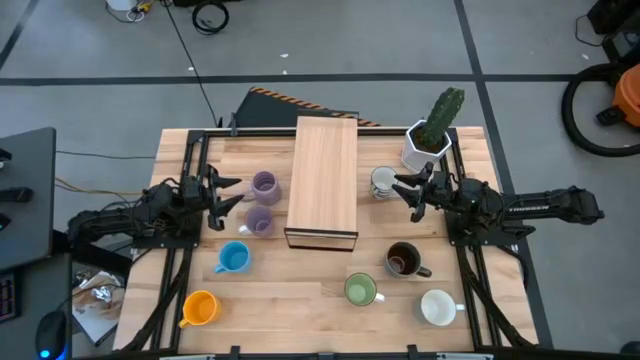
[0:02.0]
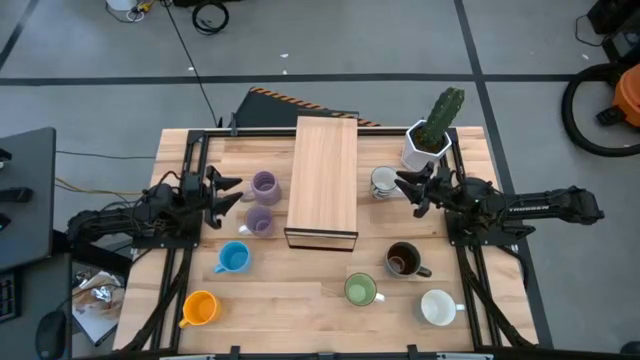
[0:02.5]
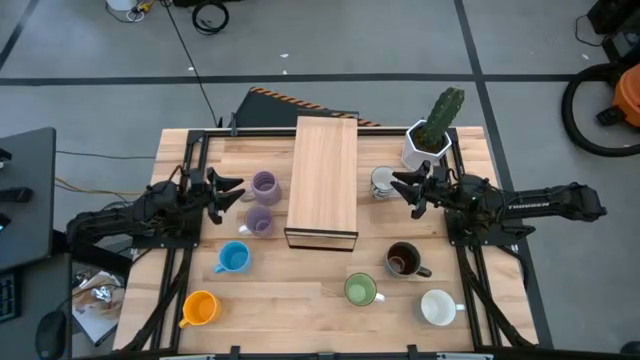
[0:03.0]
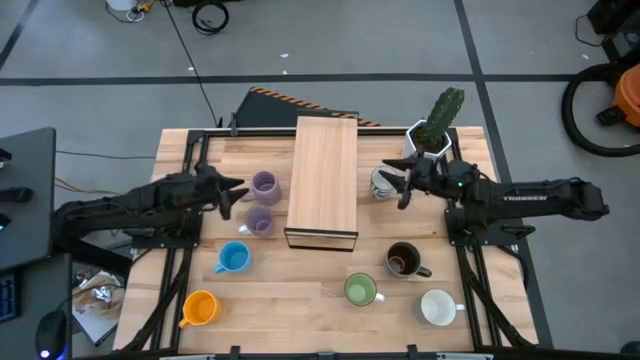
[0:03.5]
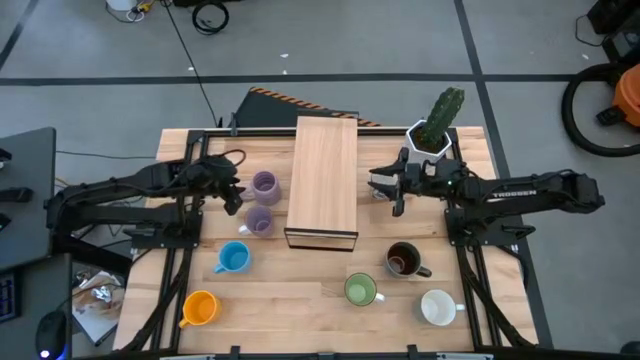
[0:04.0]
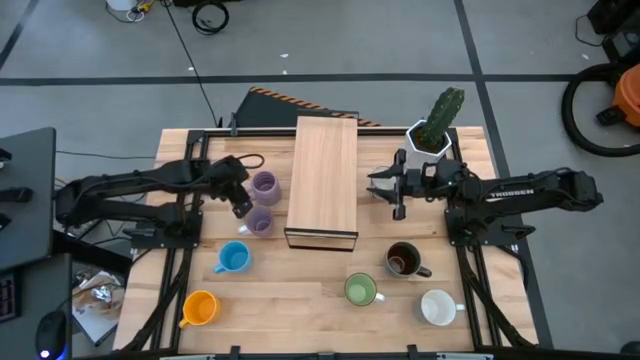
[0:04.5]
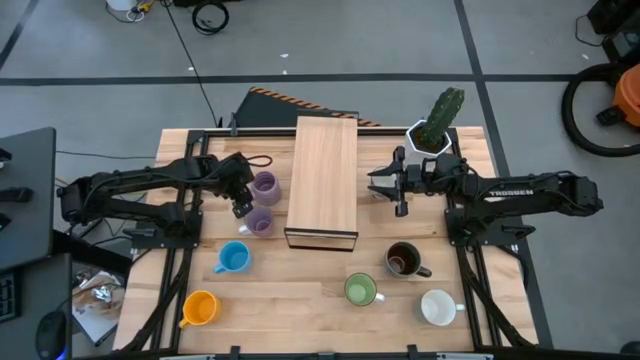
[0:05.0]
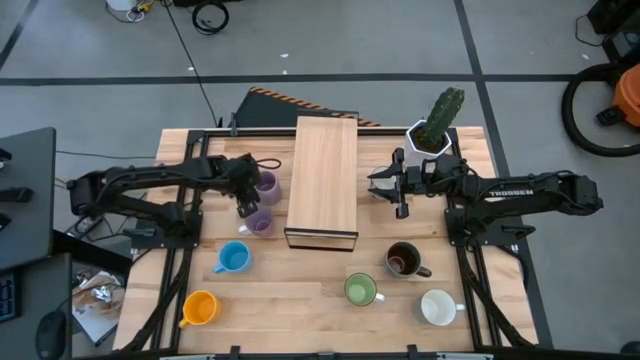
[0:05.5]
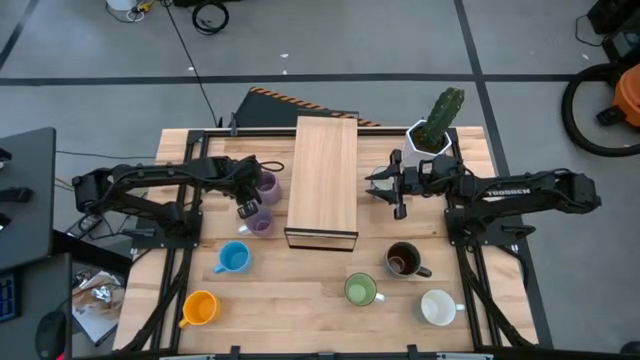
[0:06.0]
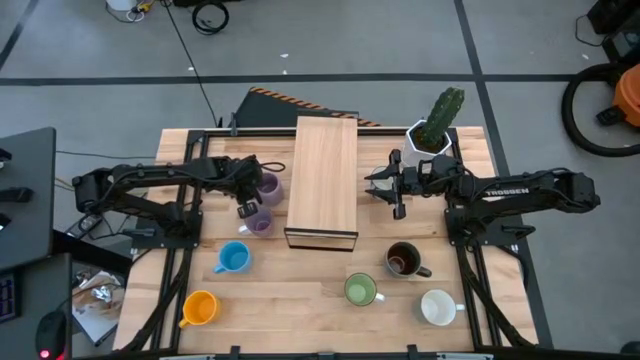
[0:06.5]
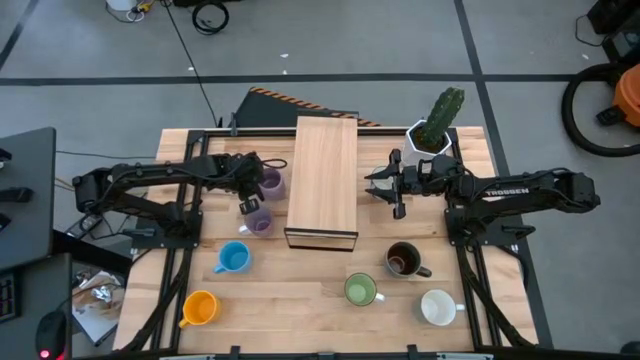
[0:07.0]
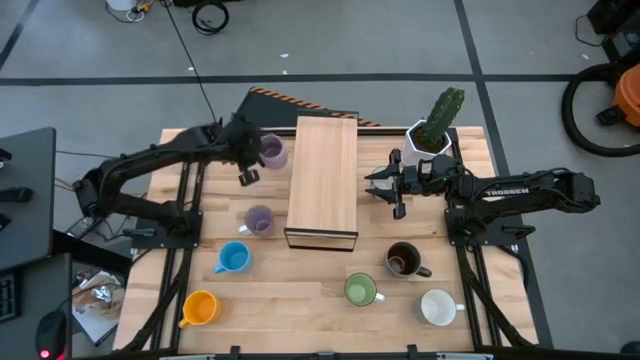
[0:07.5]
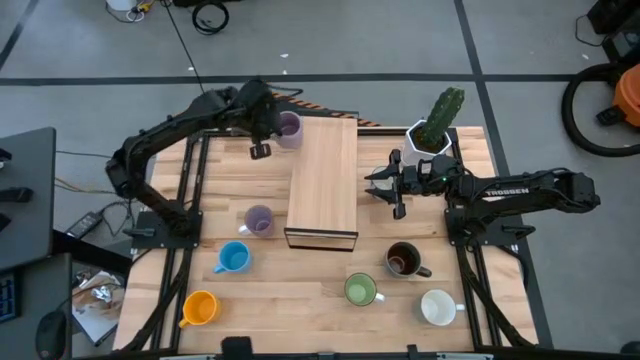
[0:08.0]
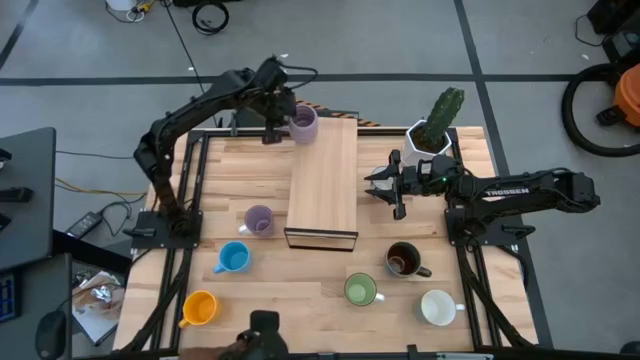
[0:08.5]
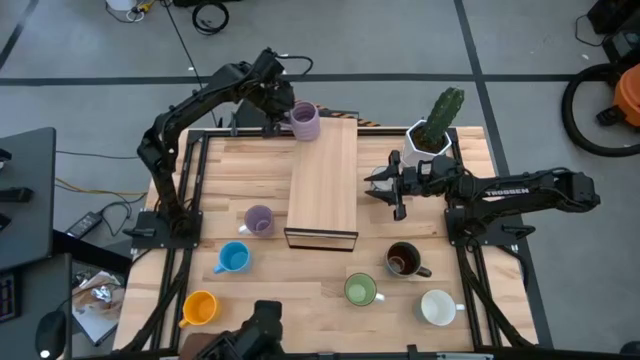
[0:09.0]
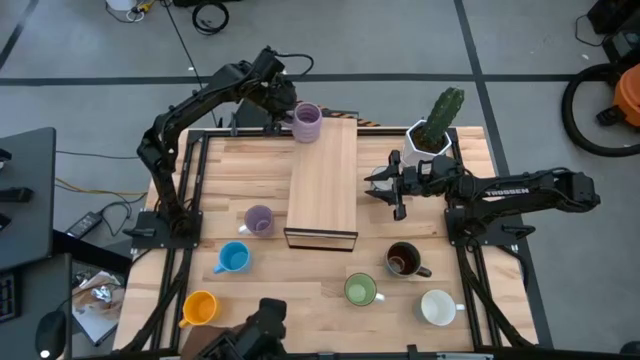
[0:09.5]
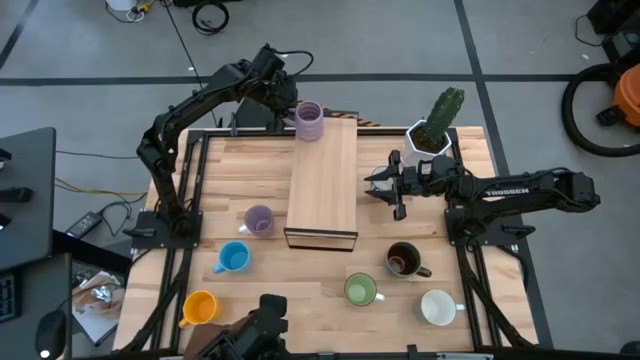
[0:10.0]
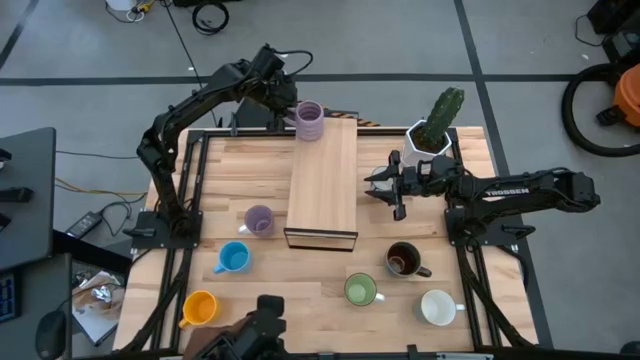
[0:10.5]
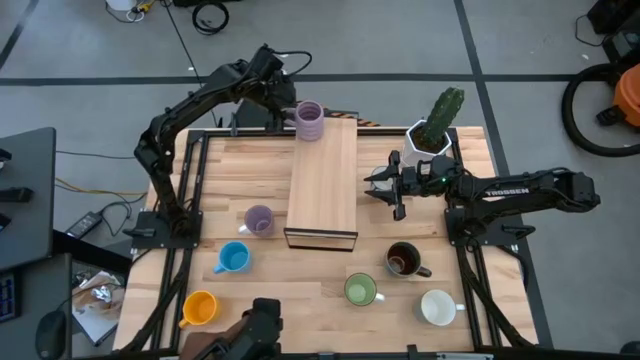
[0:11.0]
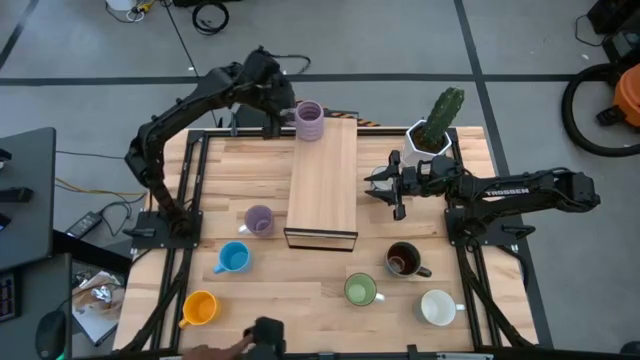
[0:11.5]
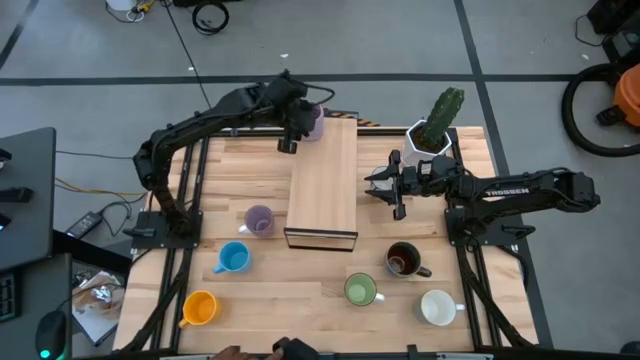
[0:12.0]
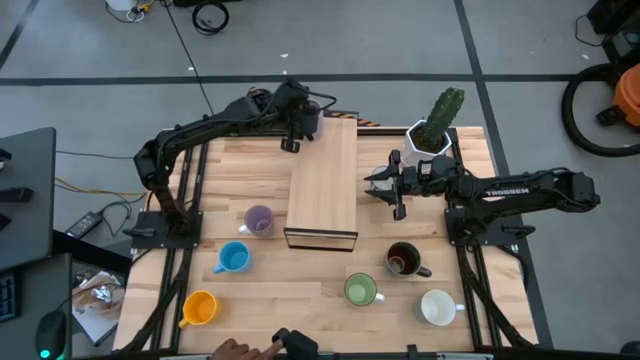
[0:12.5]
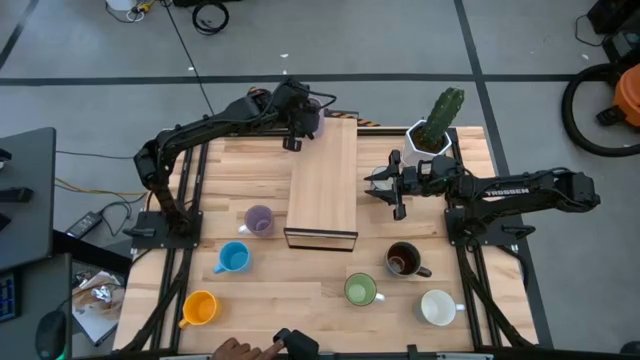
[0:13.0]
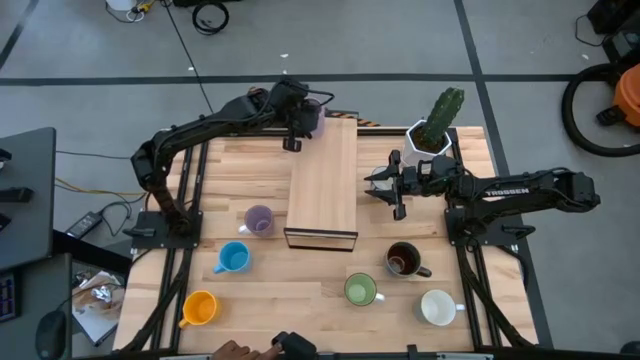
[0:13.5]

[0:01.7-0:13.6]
Task: Place coffee mugs
Put the top purple mug on the shelf

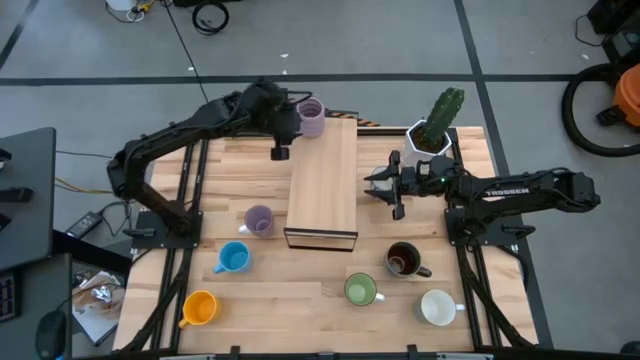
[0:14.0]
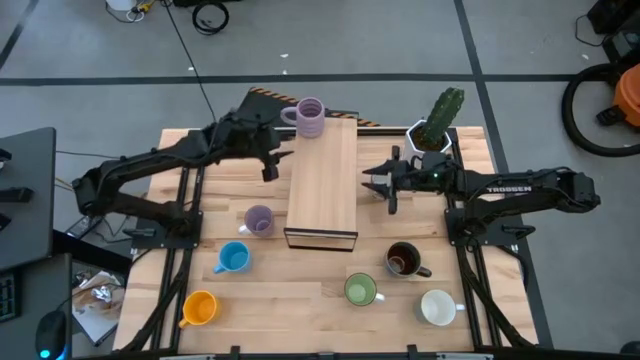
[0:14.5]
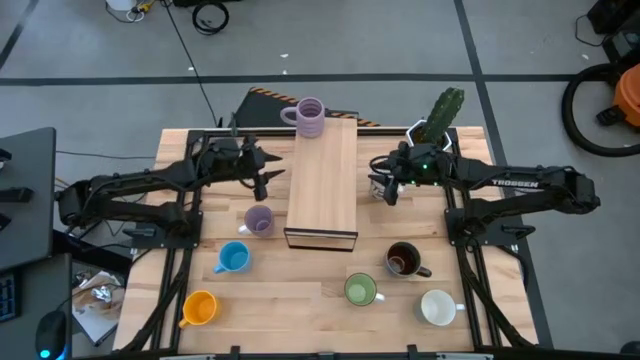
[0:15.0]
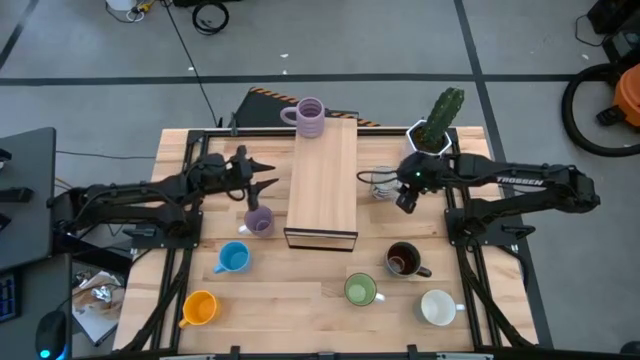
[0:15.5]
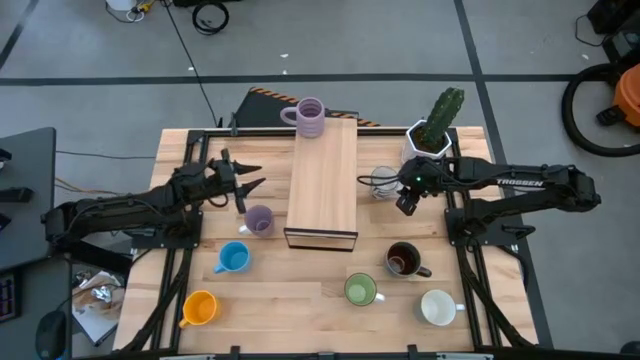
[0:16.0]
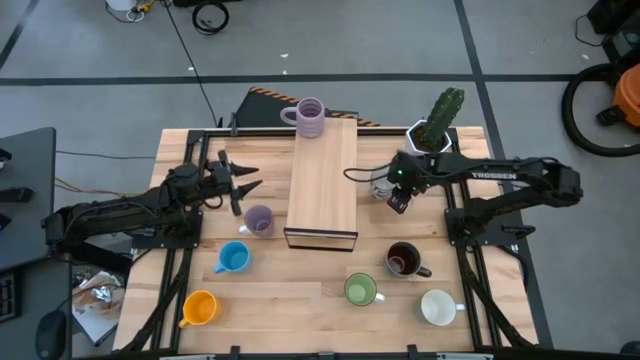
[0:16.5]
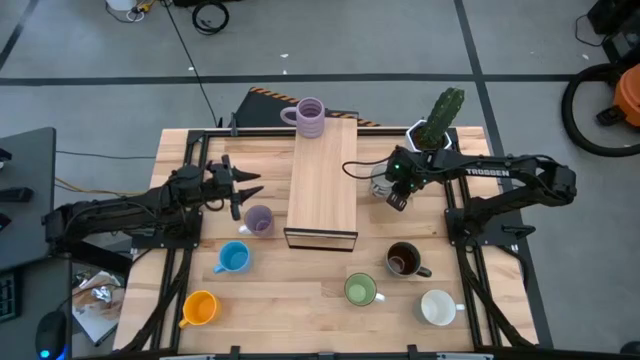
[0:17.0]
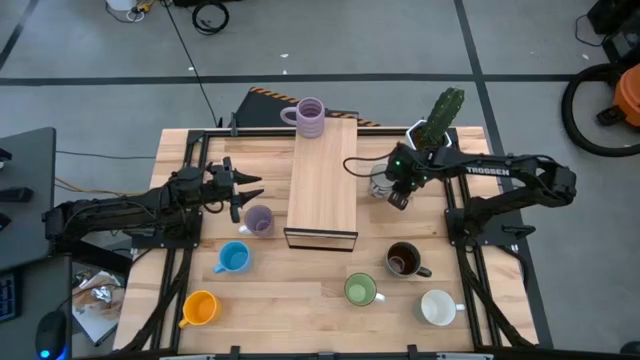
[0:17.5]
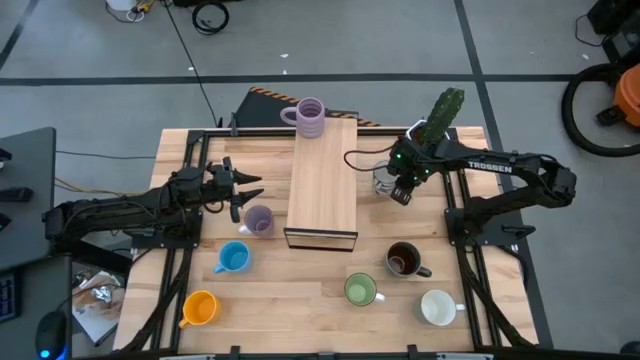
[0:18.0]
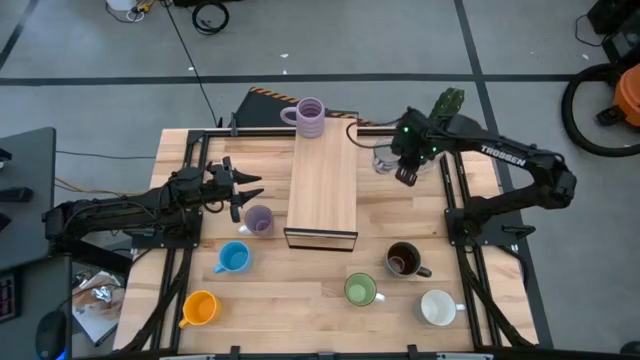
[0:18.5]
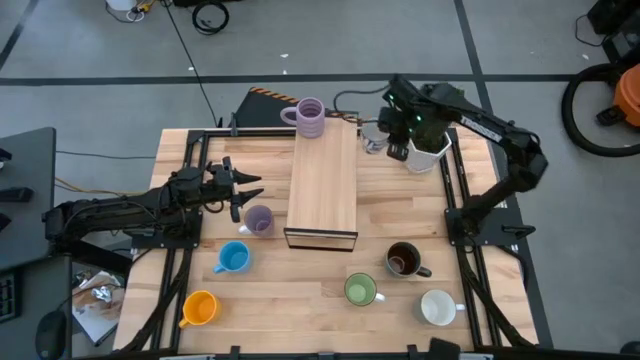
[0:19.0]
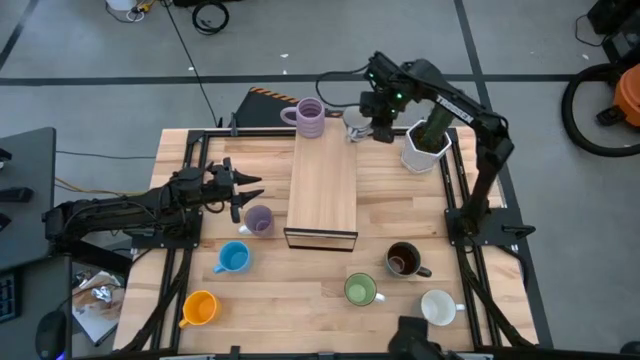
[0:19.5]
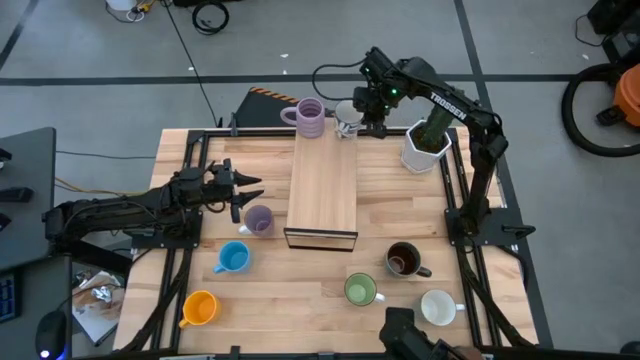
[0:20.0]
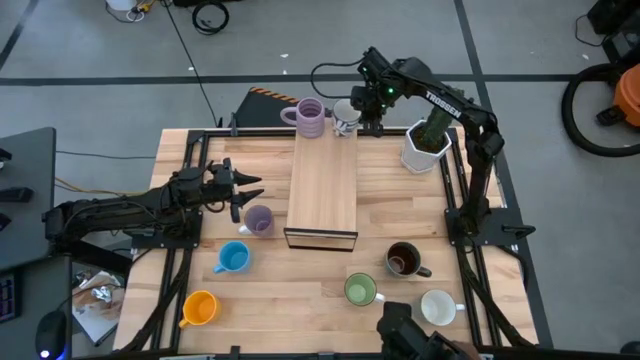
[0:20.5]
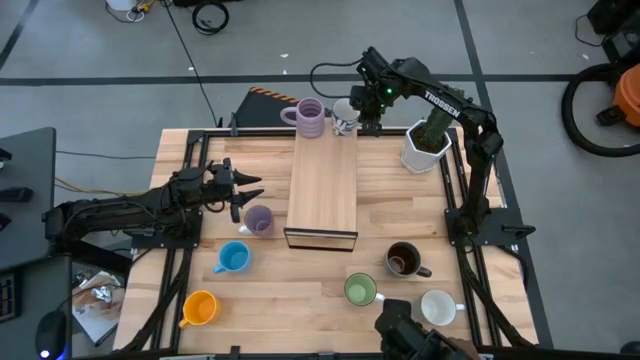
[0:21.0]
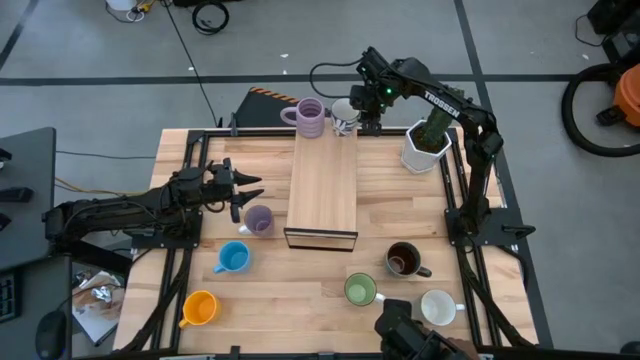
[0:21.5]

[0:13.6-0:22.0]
Put the dark blue patterned mug on the shelf

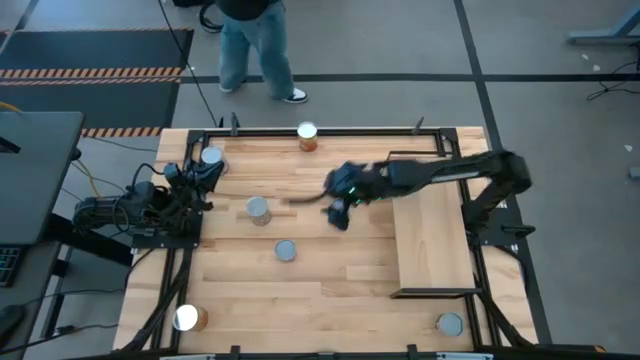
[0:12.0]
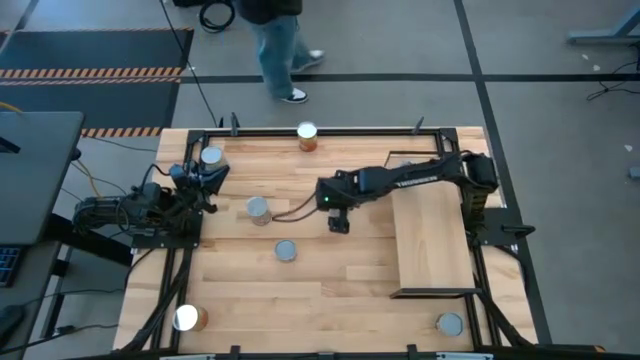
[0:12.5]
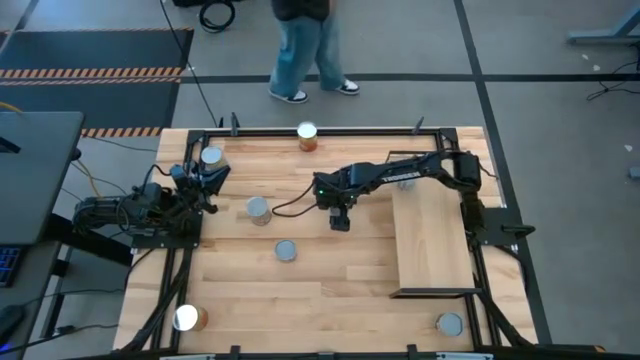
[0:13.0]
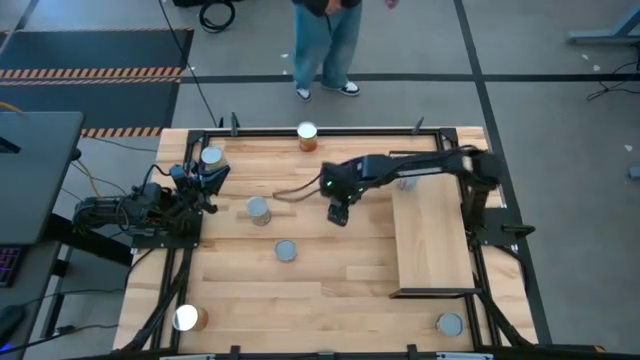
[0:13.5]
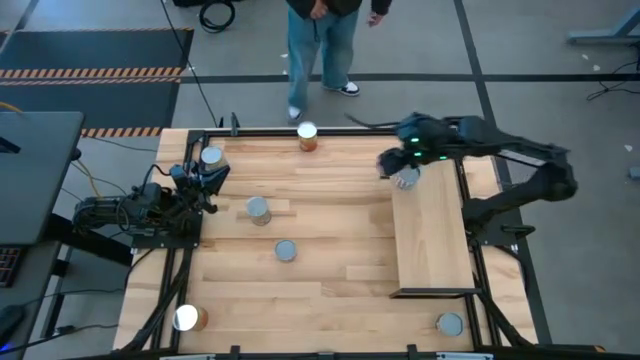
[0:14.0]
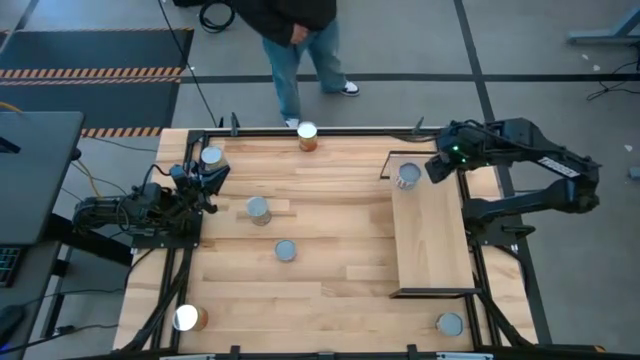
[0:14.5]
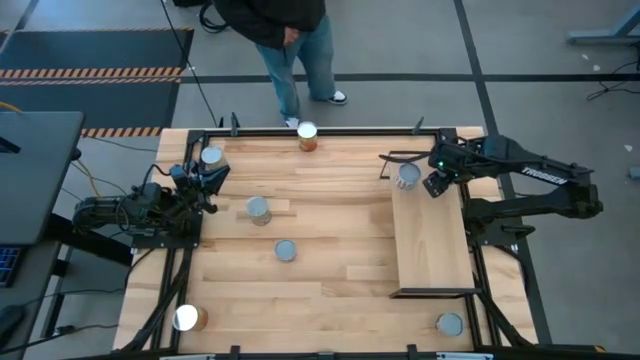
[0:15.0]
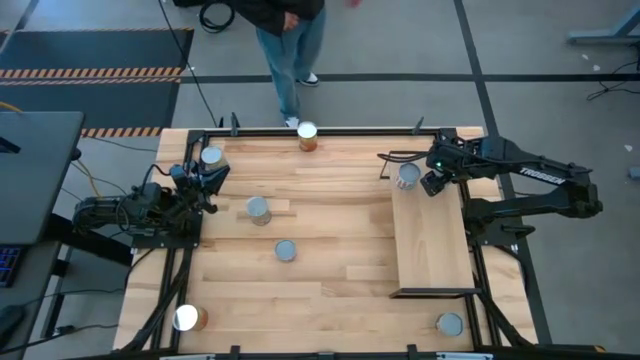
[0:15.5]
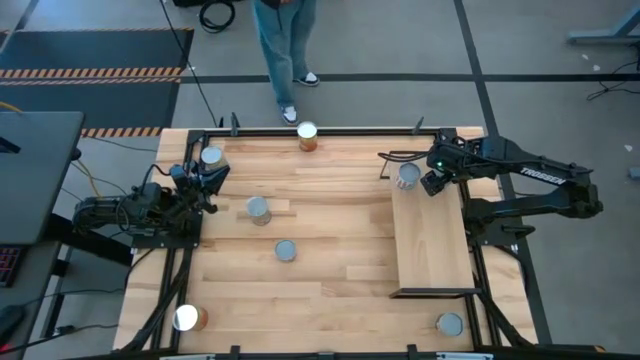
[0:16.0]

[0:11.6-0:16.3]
Task: Pick and place cans onto a shelf
Put the small canned corn on the shelf
